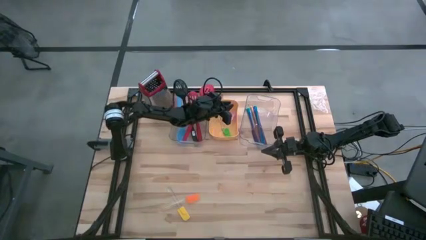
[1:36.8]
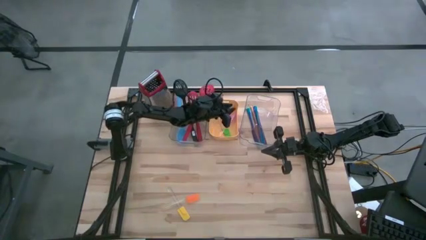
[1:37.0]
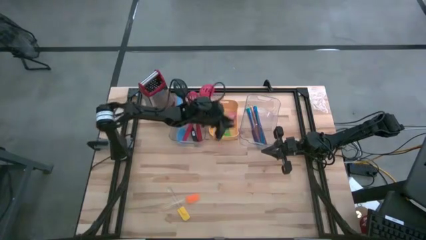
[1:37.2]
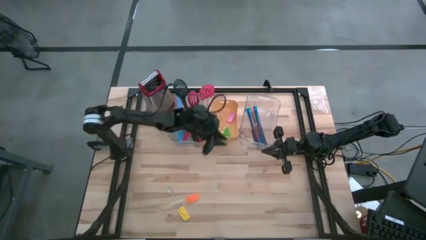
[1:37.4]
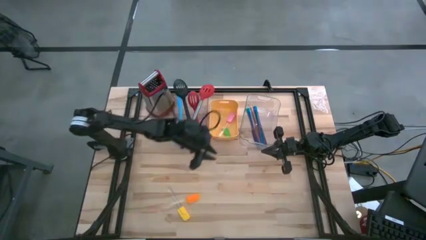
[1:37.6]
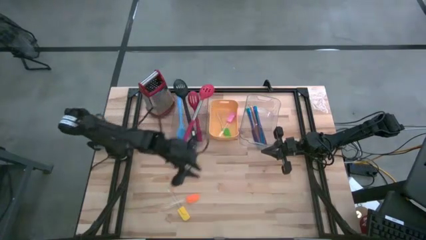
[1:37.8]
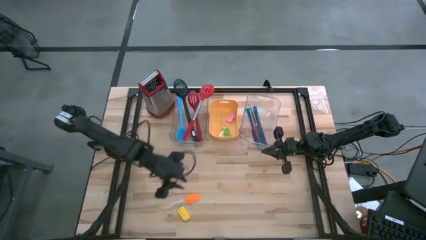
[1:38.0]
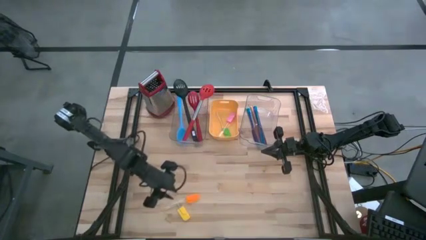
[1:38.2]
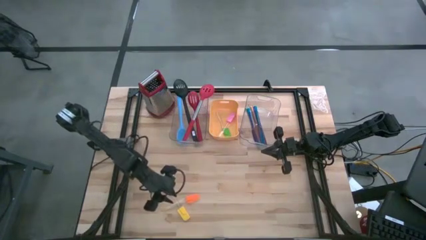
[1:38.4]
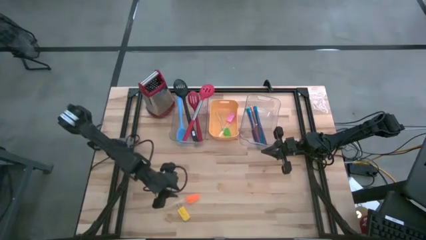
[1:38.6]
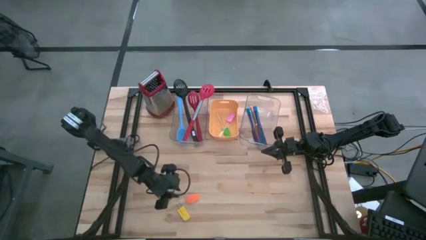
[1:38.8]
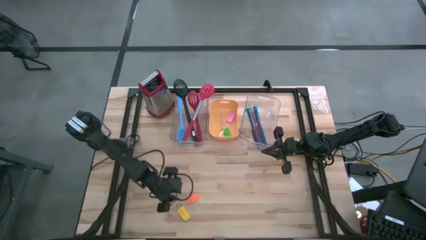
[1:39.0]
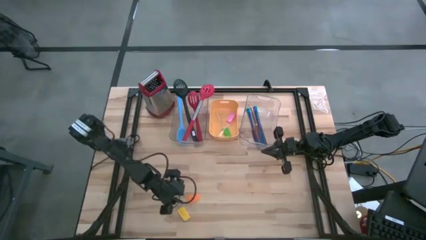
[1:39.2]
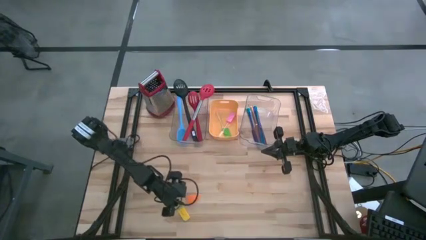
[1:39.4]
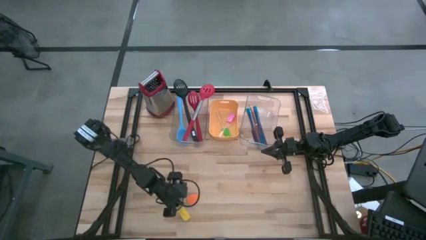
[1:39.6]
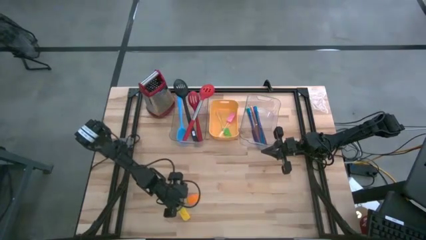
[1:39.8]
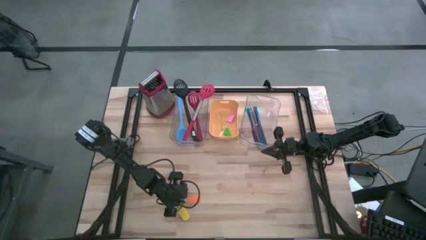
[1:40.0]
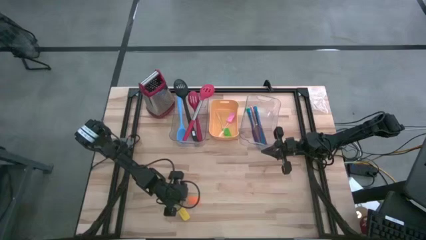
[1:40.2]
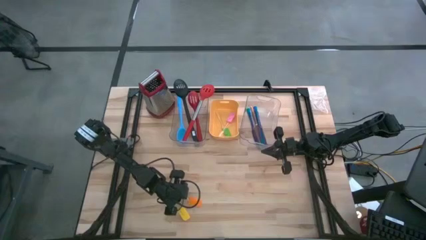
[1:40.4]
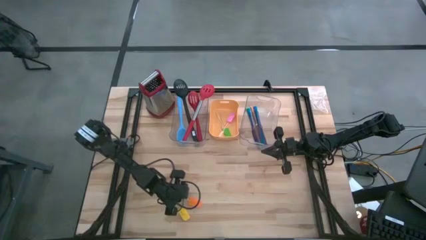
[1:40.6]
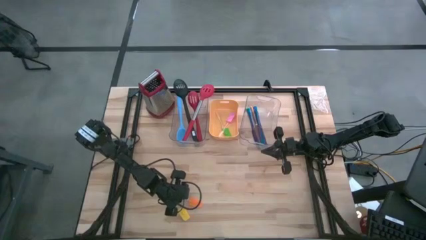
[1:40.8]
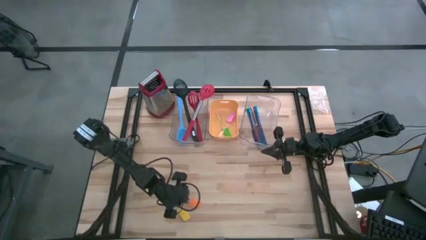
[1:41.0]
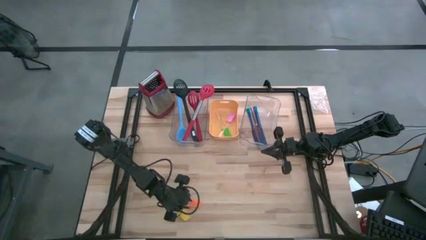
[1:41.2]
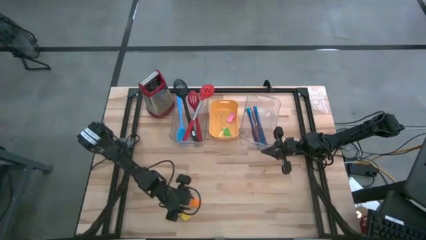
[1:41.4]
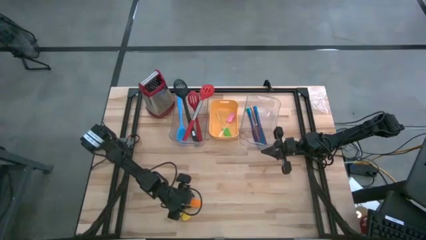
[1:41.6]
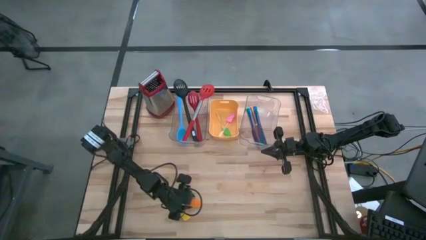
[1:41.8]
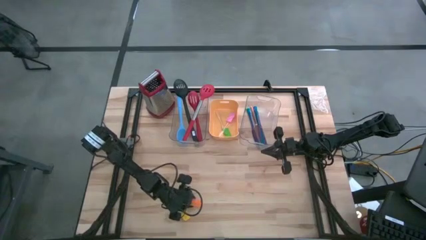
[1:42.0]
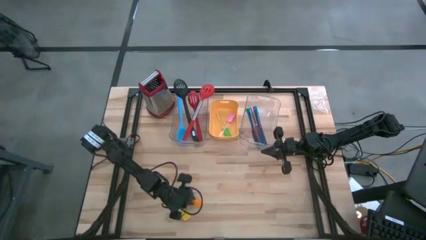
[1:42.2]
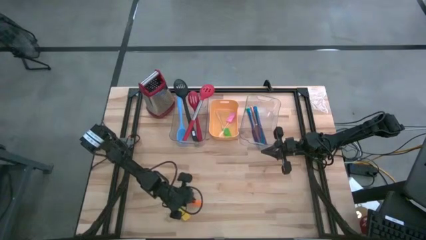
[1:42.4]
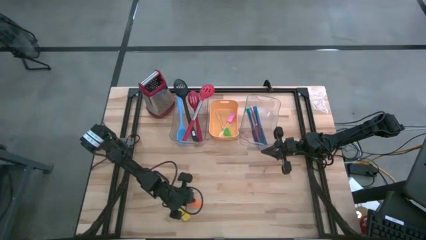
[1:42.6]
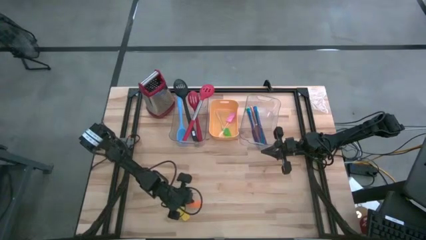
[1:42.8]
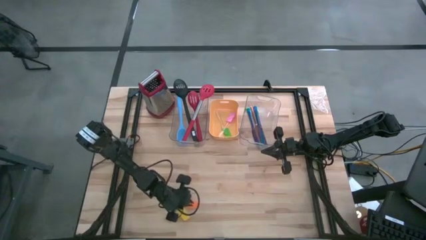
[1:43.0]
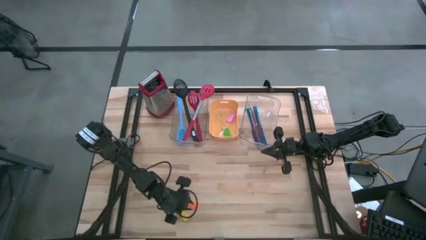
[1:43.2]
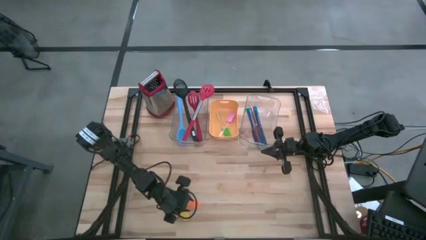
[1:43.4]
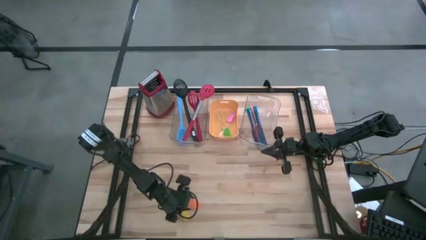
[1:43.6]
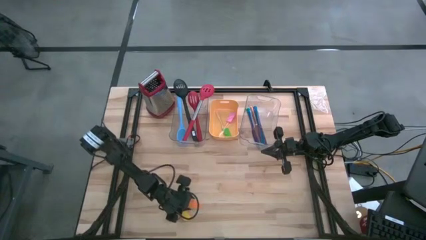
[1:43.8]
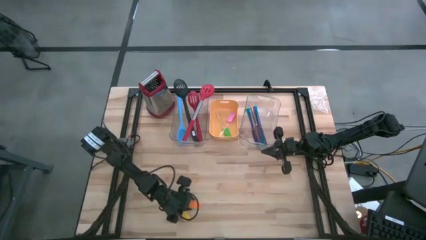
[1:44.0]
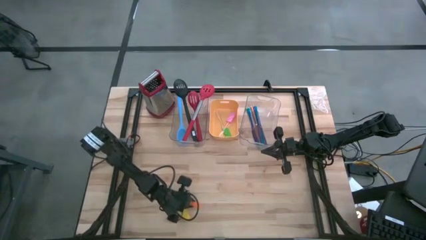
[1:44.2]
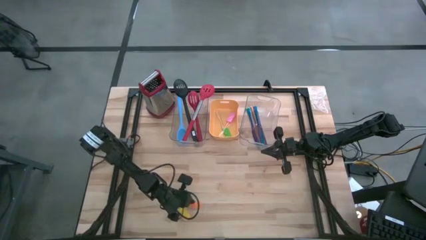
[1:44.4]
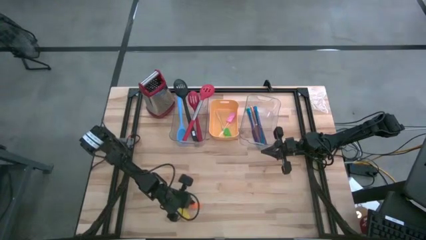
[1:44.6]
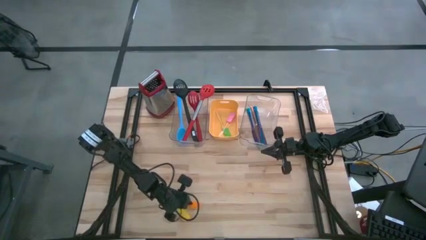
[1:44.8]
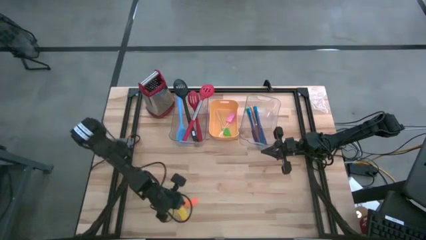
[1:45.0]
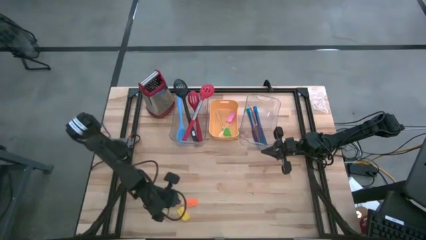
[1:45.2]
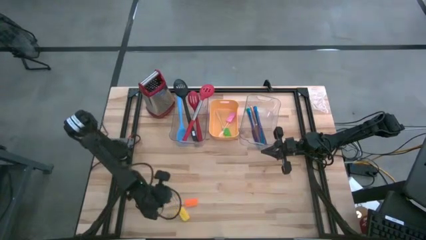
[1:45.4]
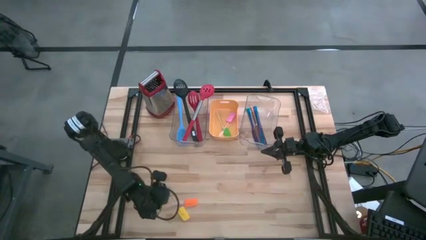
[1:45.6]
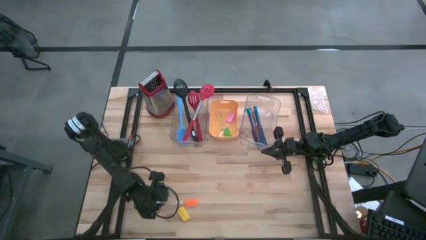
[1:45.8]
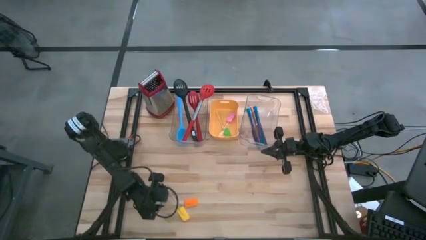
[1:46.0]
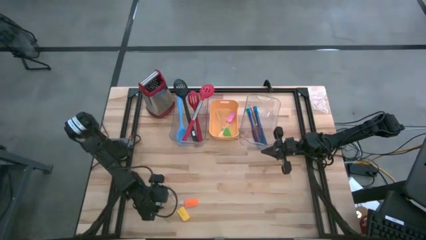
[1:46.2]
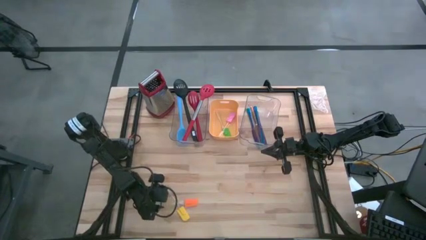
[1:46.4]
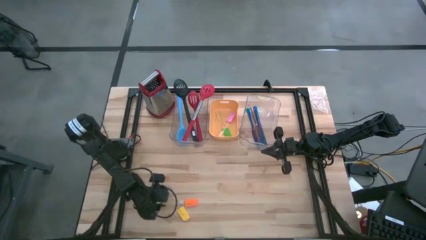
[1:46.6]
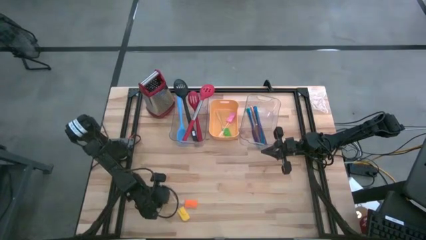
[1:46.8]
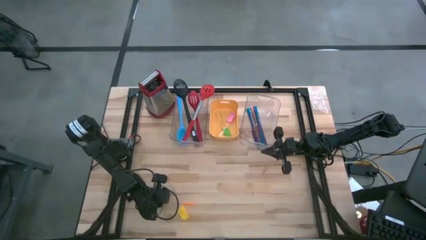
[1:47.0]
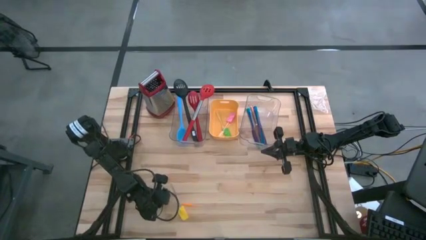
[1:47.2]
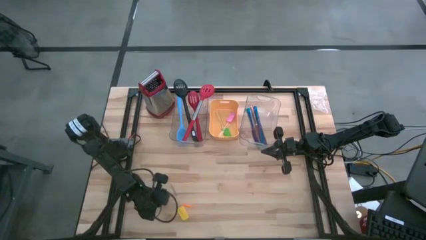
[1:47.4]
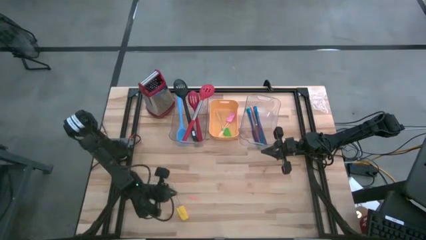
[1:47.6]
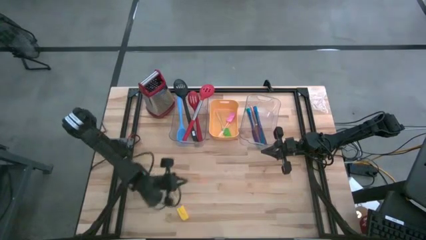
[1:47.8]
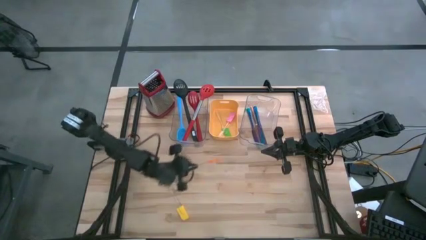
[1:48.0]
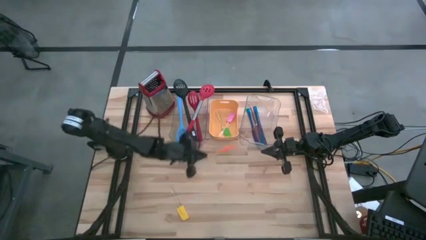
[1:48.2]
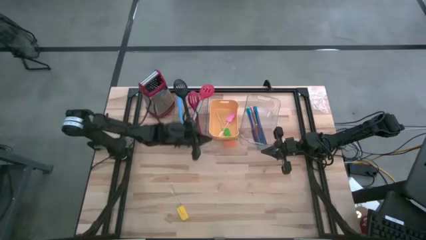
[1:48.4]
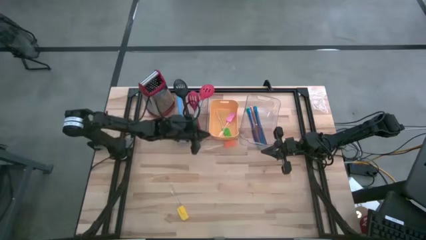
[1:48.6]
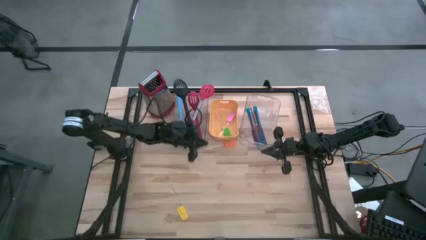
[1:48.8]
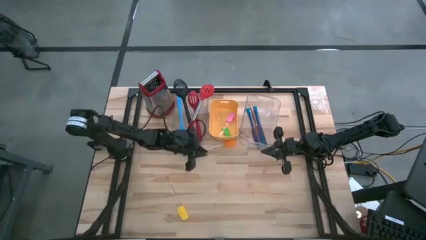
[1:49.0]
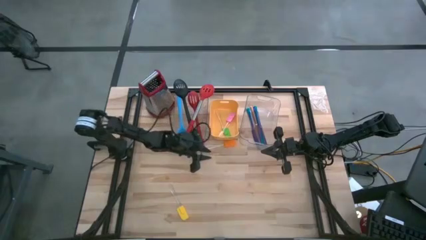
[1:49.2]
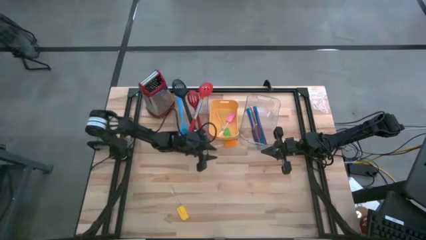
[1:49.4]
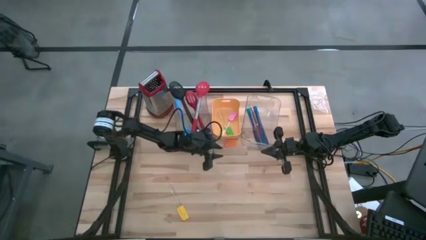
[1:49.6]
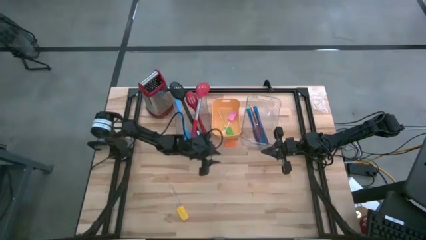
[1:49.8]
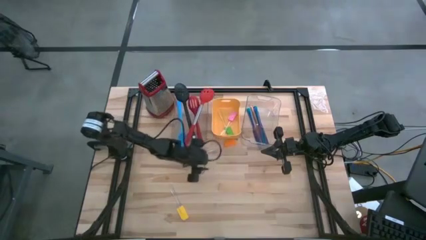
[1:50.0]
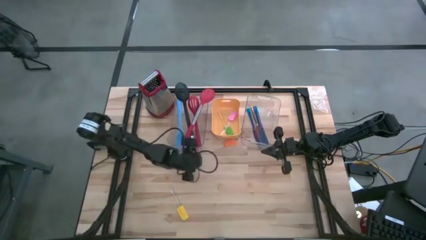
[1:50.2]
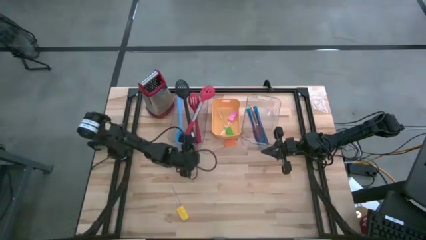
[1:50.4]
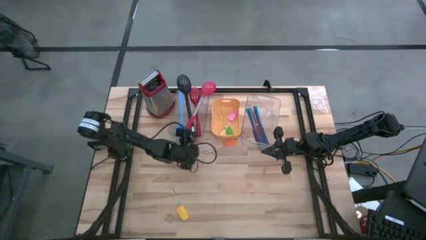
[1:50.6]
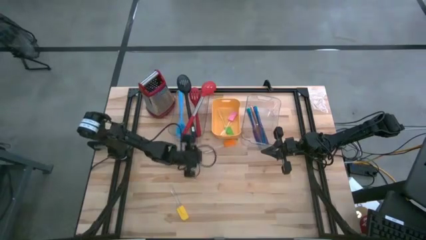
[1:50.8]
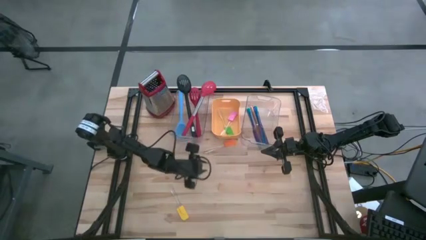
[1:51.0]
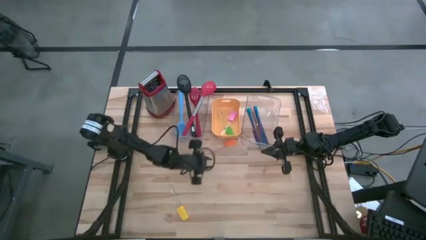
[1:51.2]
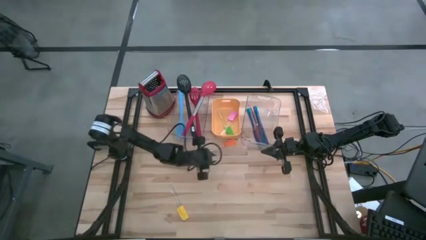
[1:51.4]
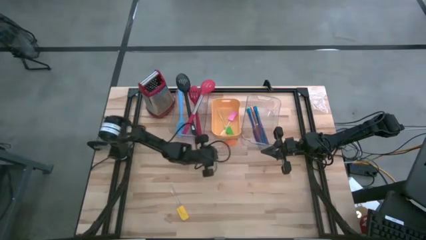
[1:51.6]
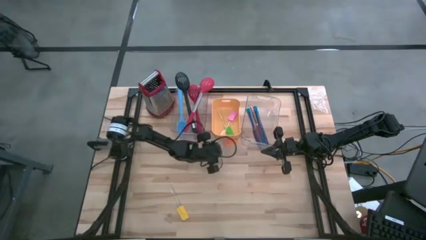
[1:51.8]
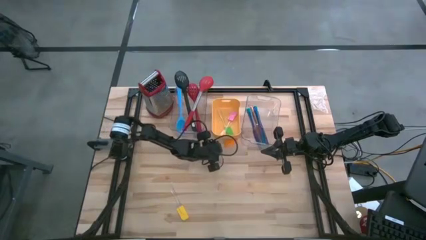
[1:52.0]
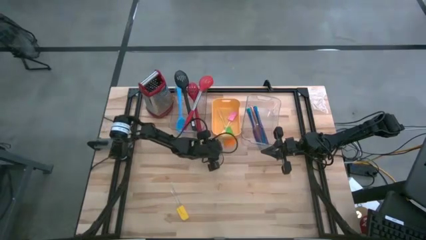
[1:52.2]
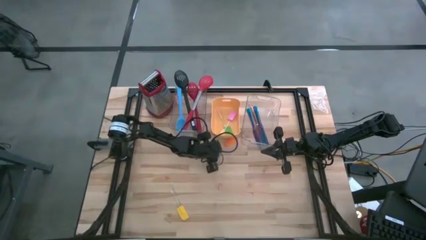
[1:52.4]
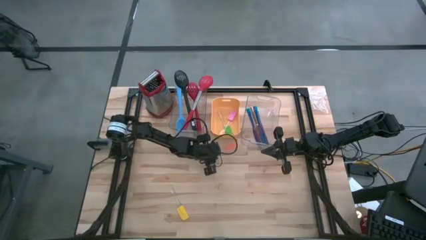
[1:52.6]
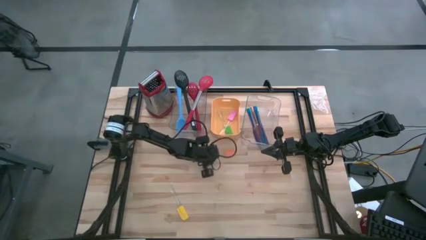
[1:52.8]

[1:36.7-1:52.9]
Task: Pick & Place Kitchen Items
Put the orange spatula into the yellow bin
